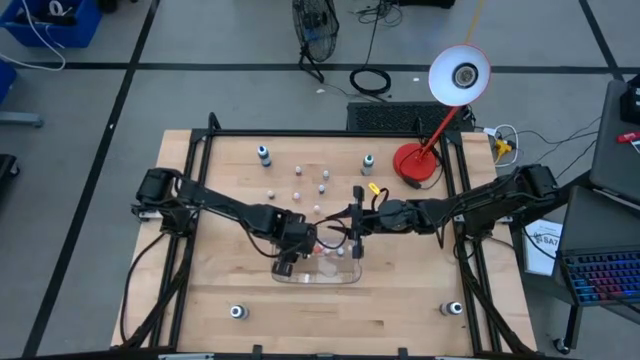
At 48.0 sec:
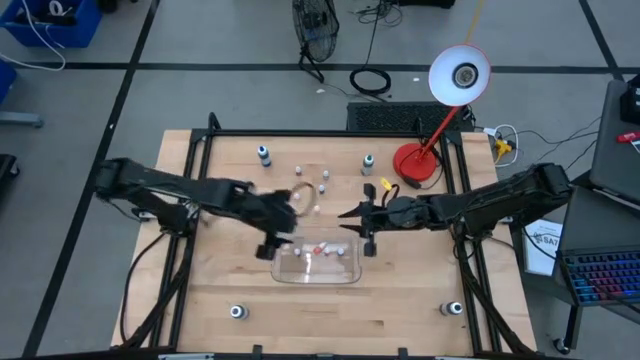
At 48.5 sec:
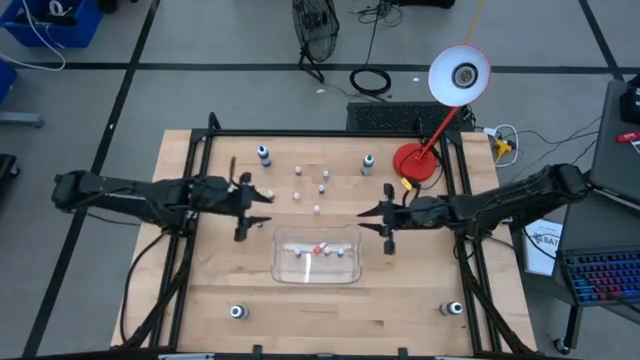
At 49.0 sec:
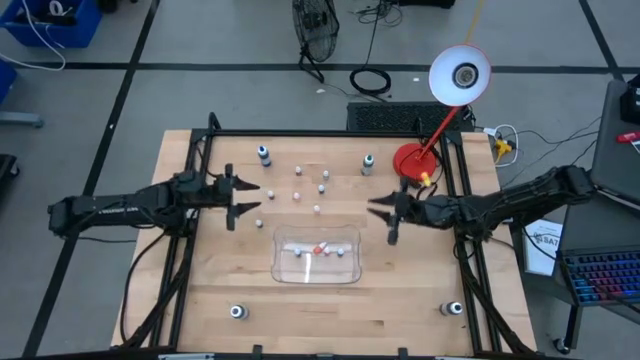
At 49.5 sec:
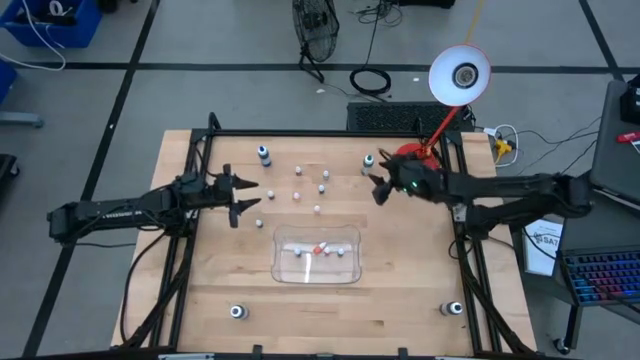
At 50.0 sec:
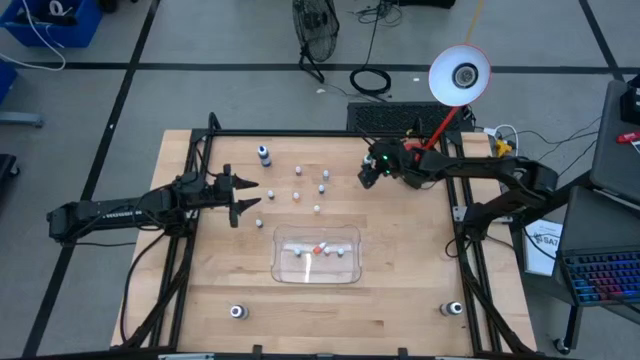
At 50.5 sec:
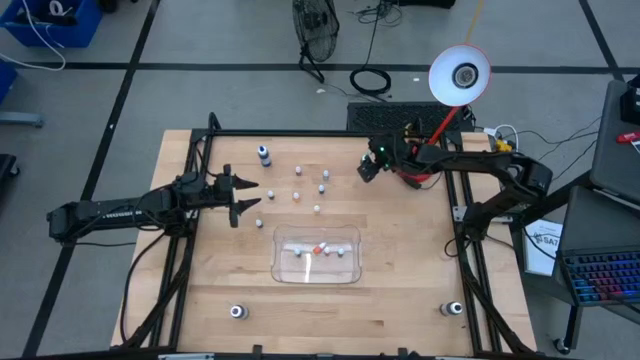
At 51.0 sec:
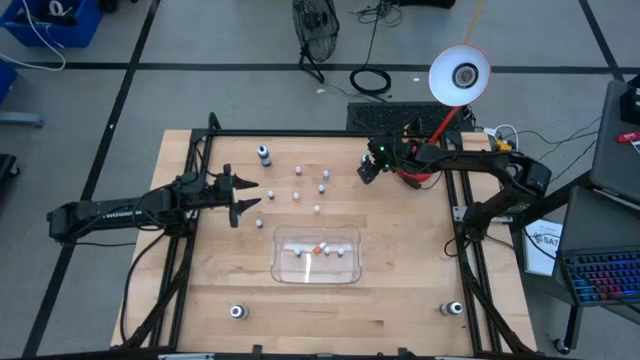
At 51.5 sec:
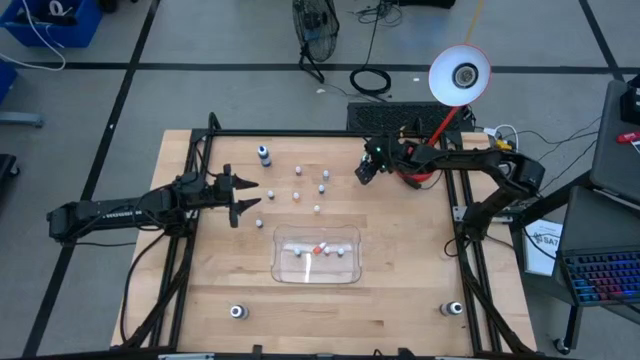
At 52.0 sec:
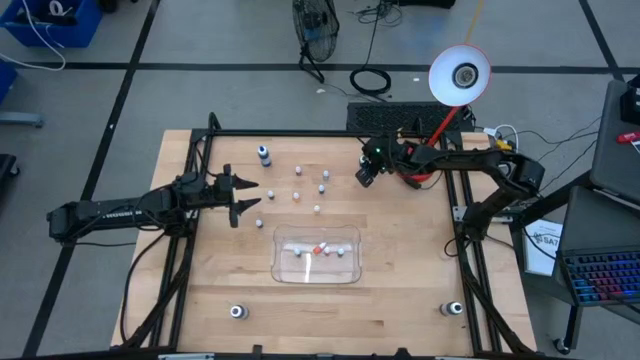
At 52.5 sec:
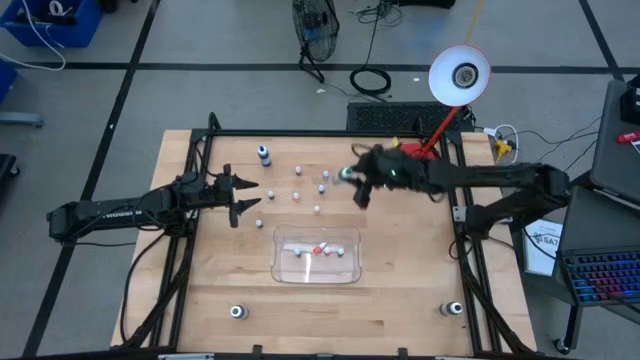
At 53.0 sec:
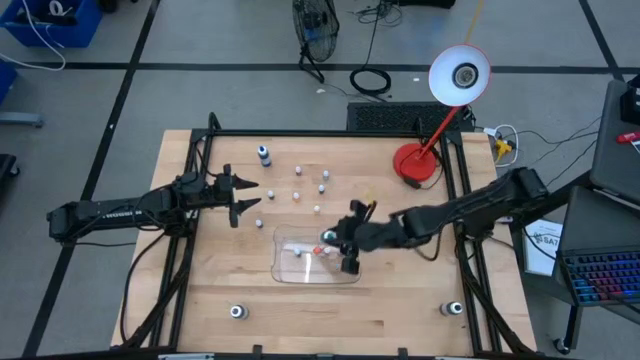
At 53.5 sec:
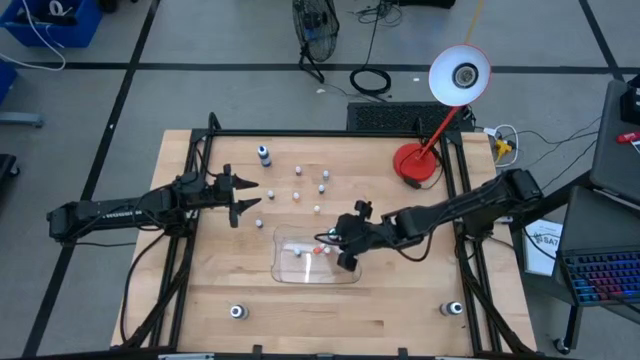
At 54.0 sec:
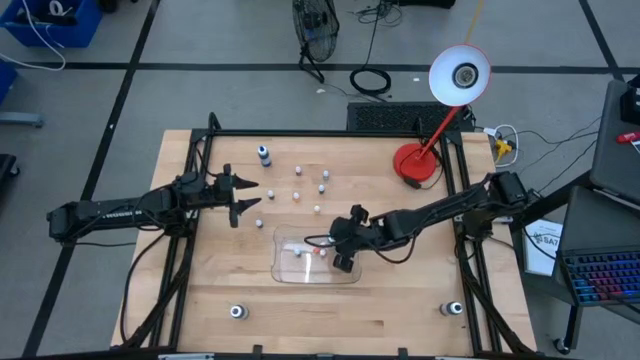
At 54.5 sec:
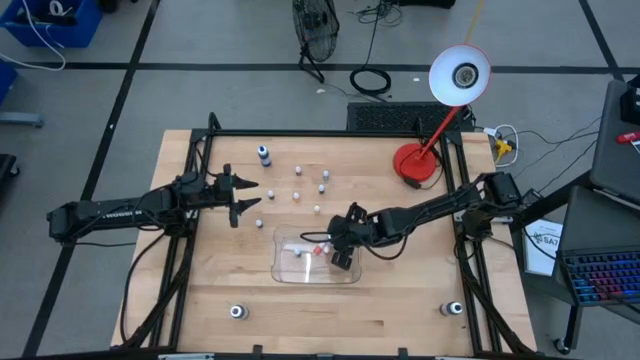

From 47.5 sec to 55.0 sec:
Task: Pick & Place food coloring
Put the large green food coloring bottle into the transparent bin

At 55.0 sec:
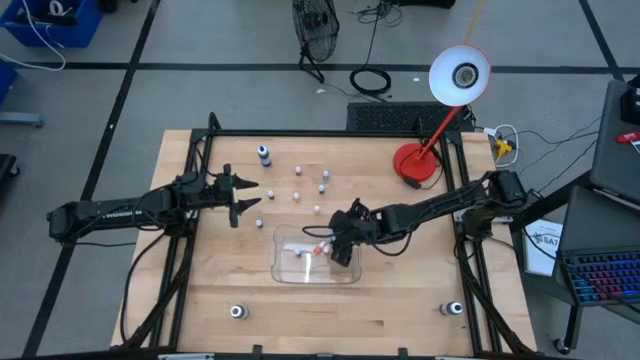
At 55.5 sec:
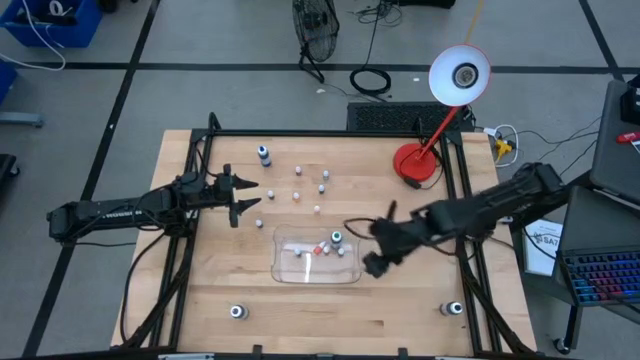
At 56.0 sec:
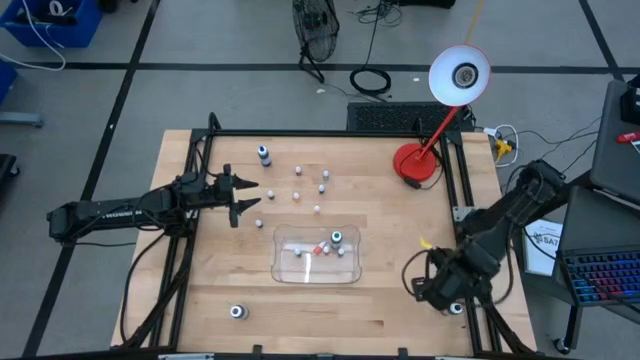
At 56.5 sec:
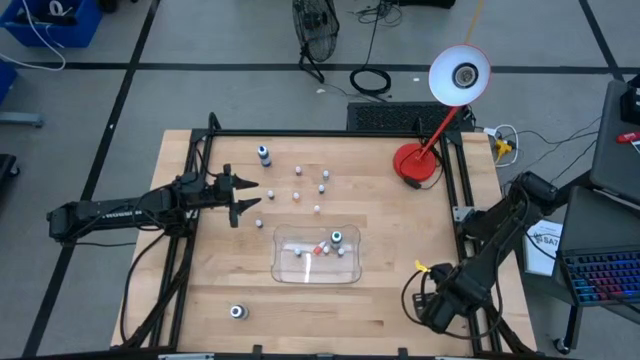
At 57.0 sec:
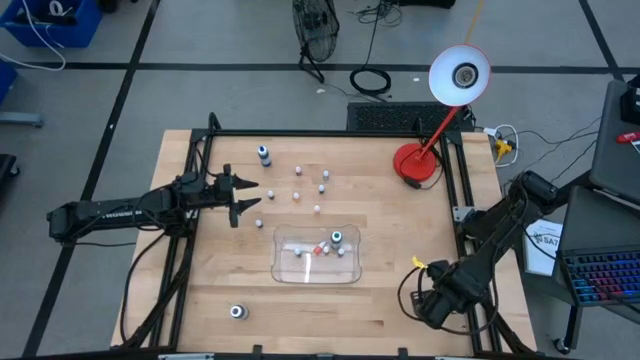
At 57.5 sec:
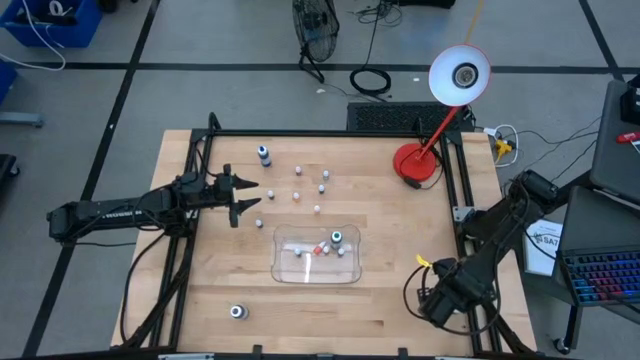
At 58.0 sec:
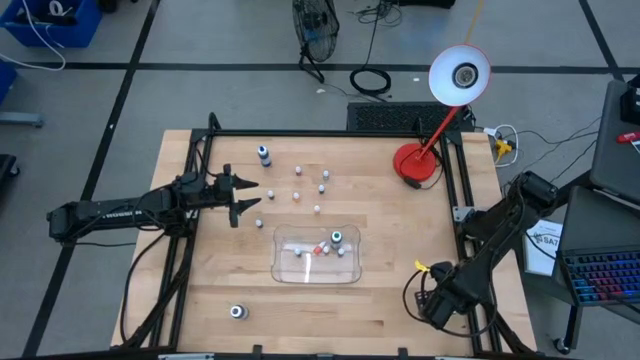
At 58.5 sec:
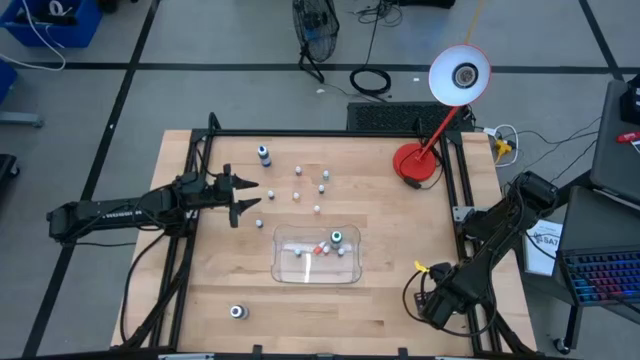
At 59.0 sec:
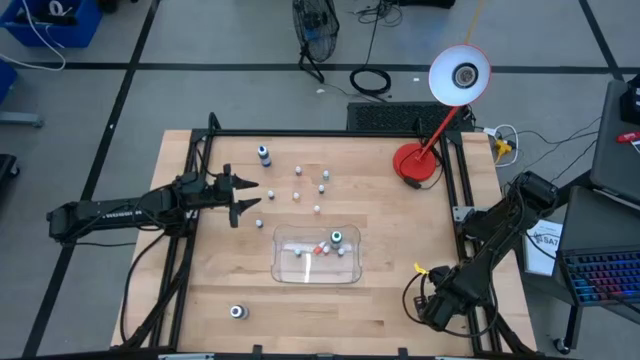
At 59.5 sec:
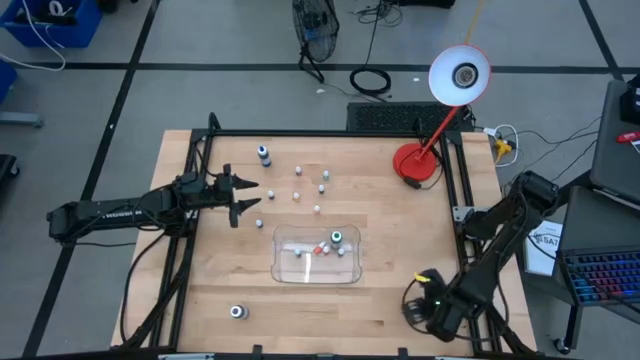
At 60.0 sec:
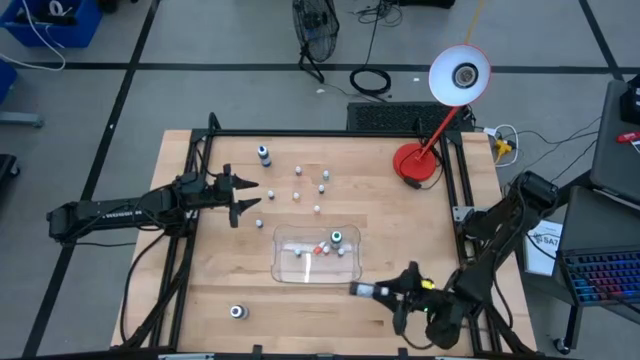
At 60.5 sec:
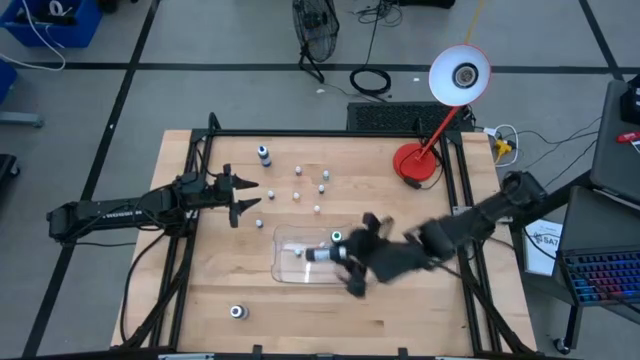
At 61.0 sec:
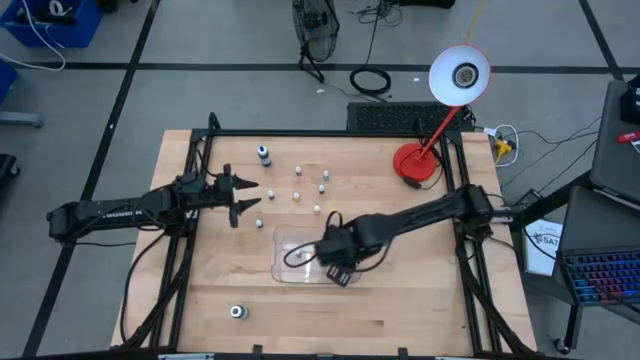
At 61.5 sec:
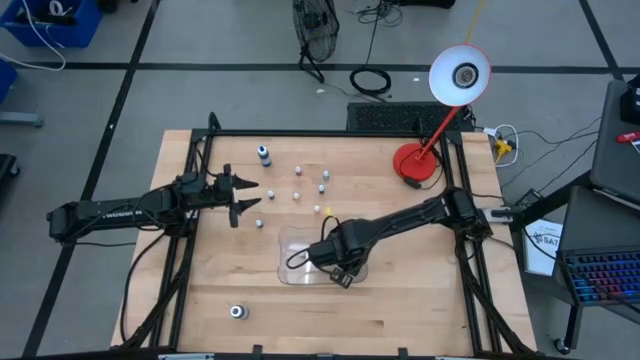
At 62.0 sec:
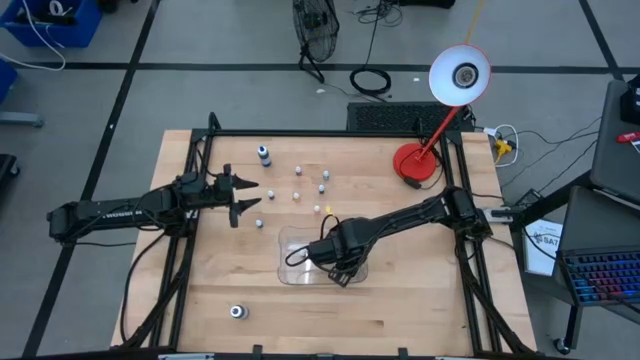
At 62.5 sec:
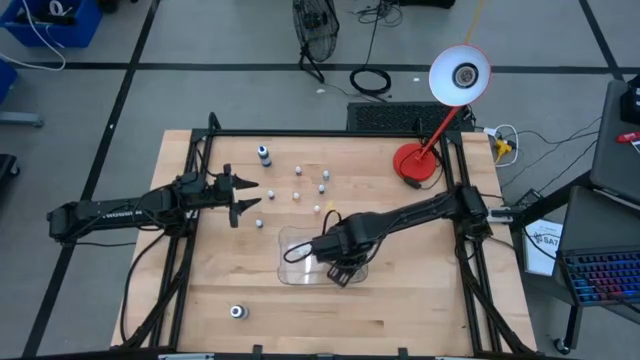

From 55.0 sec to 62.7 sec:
Put the large black food coloring bottle into the transparent bin

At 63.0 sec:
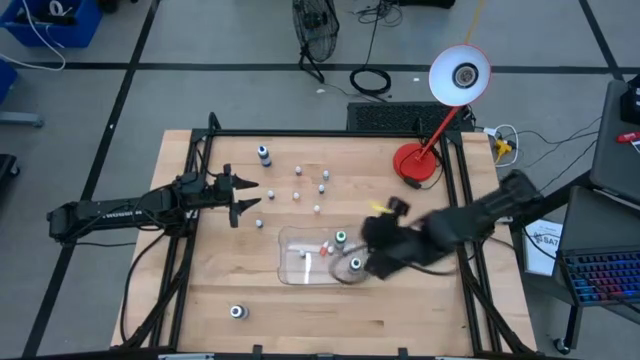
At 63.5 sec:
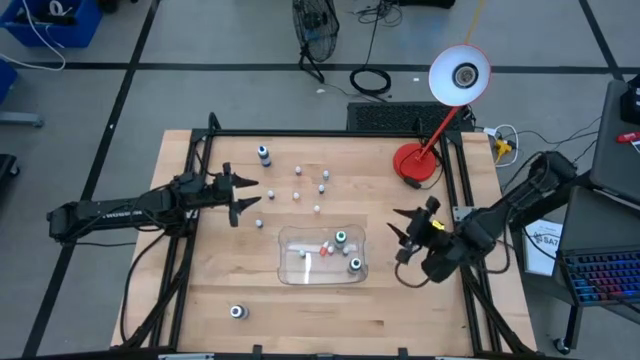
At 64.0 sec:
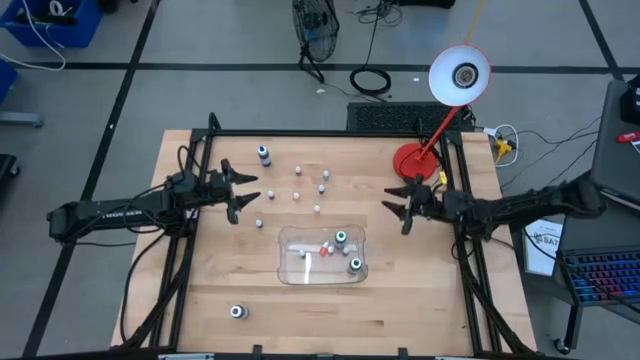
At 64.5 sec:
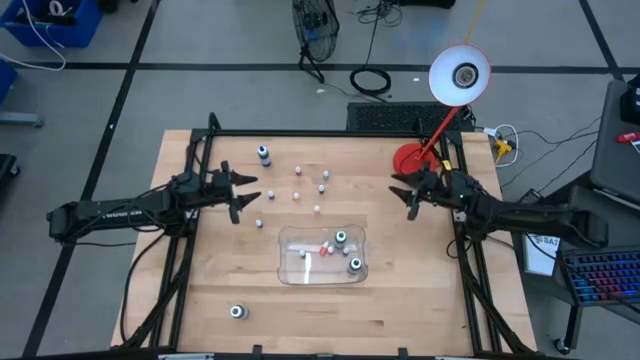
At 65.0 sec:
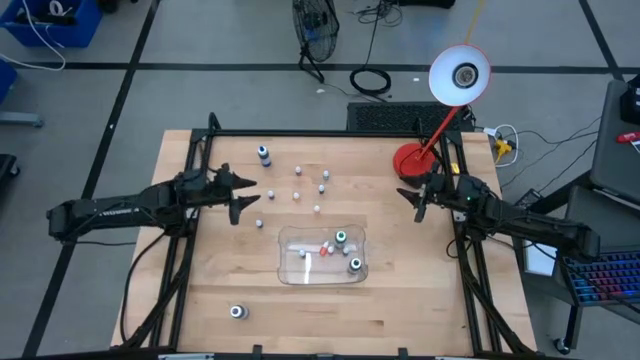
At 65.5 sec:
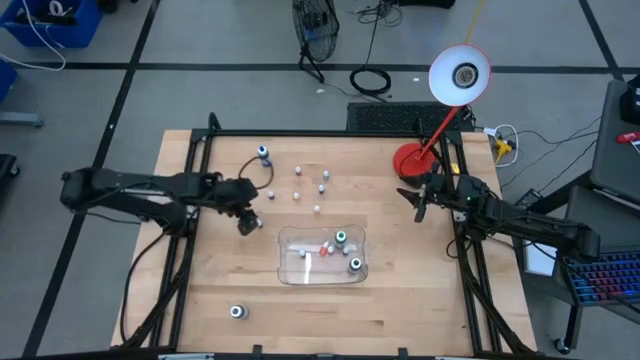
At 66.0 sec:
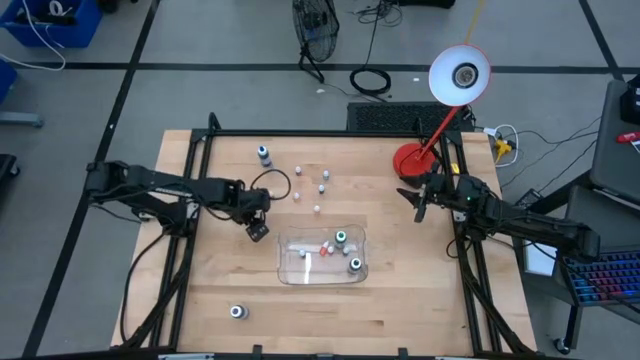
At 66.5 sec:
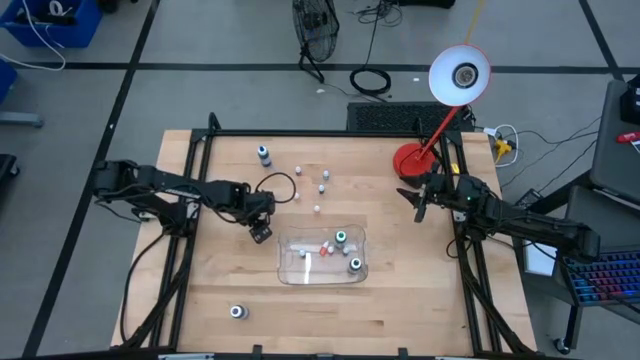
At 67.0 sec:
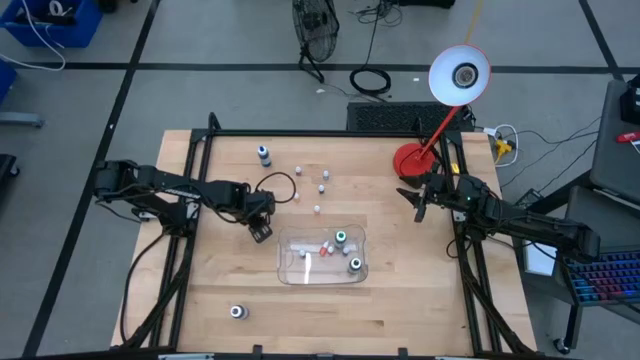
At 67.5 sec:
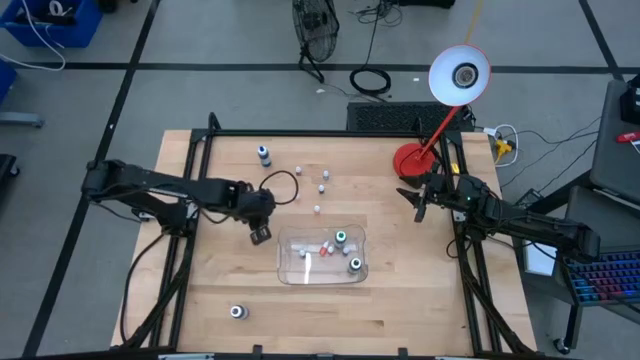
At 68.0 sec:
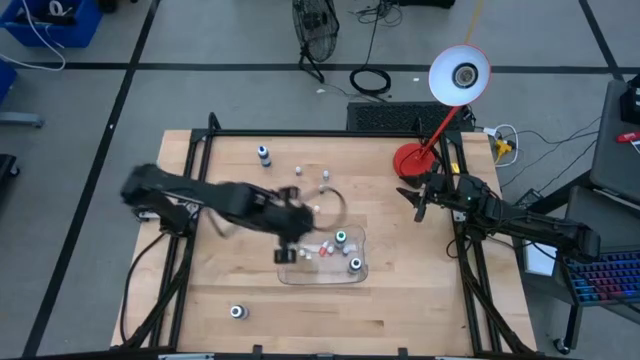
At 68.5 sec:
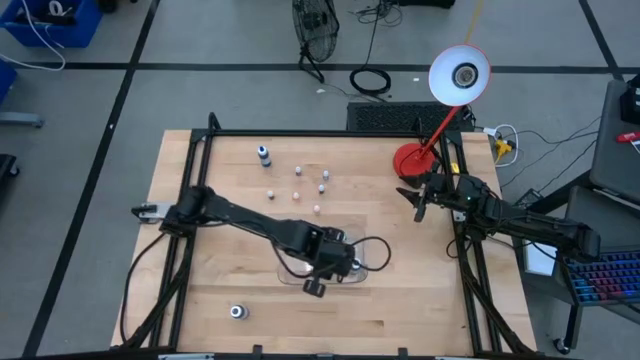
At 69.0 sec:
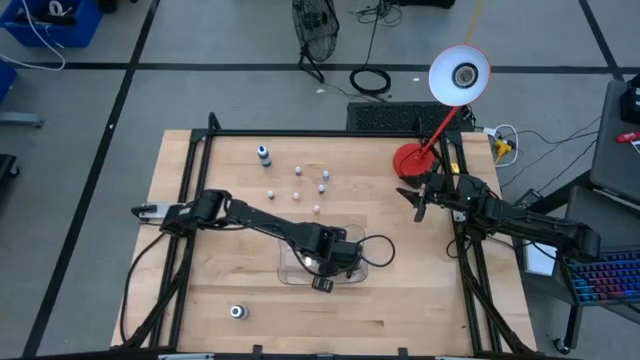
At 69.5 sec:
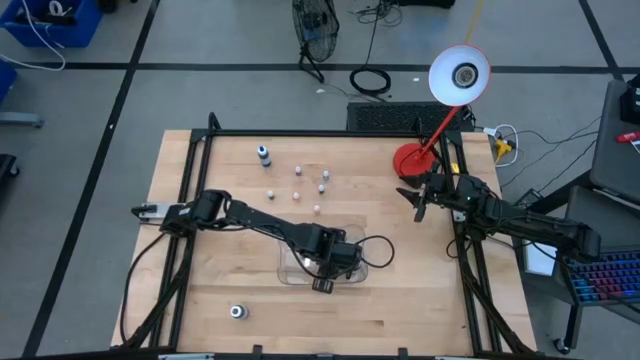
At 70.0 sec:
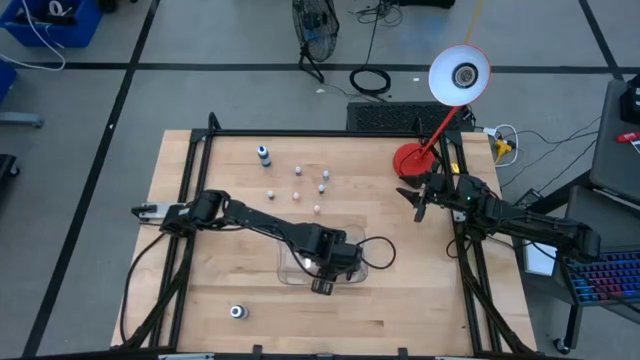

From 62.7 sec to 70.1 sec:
Put the small violet food coloring bottle into the transparent bin
